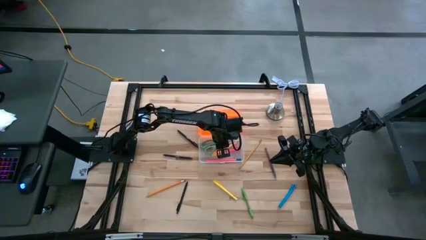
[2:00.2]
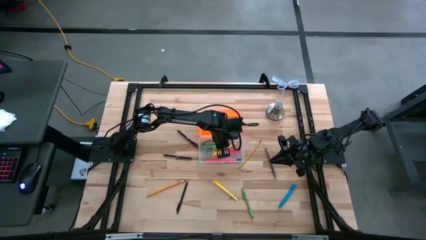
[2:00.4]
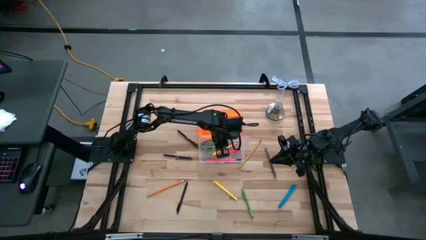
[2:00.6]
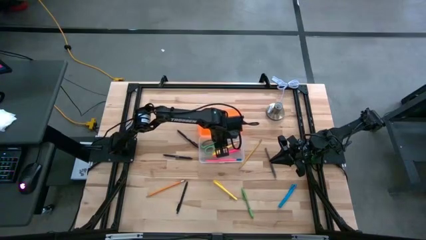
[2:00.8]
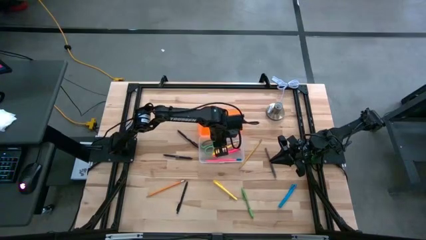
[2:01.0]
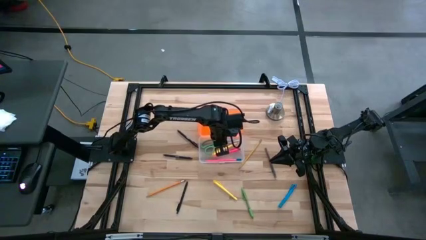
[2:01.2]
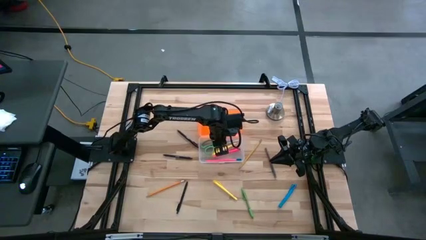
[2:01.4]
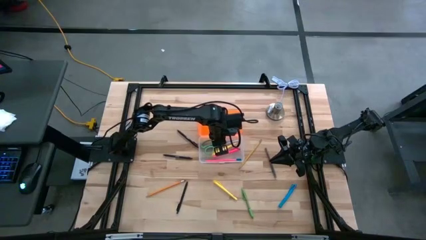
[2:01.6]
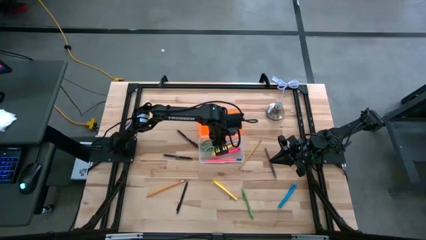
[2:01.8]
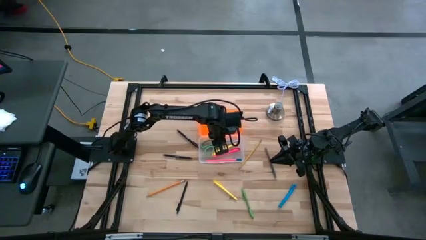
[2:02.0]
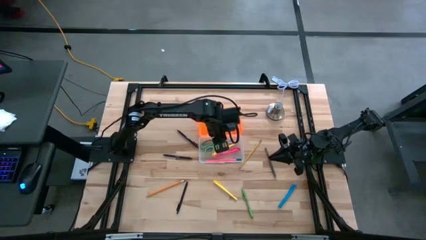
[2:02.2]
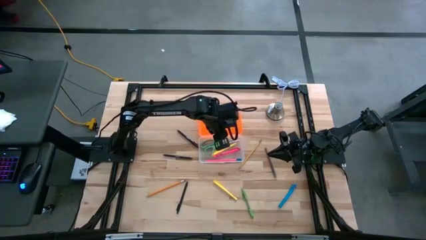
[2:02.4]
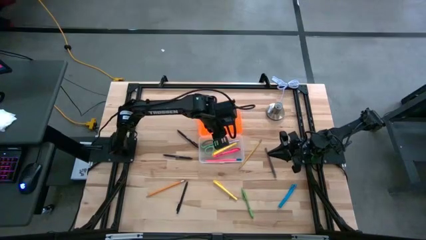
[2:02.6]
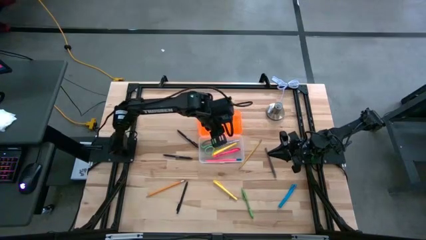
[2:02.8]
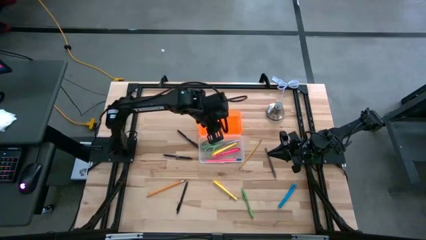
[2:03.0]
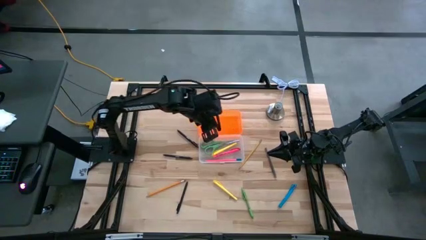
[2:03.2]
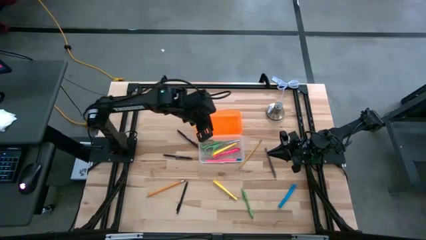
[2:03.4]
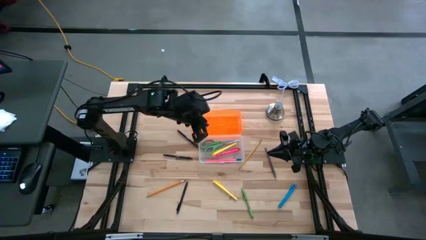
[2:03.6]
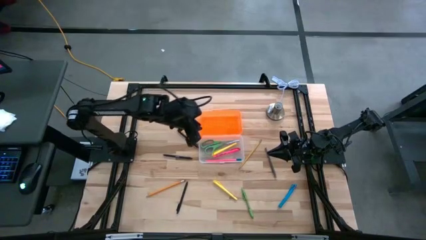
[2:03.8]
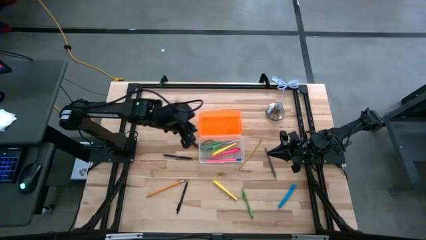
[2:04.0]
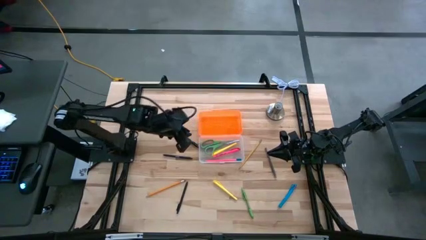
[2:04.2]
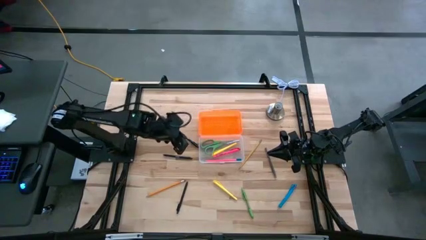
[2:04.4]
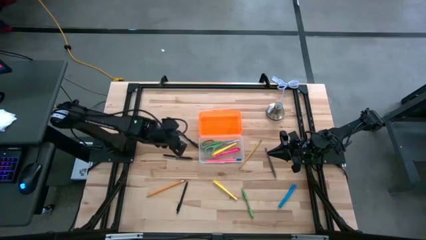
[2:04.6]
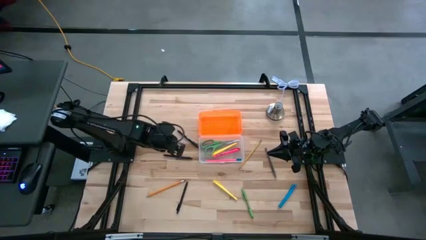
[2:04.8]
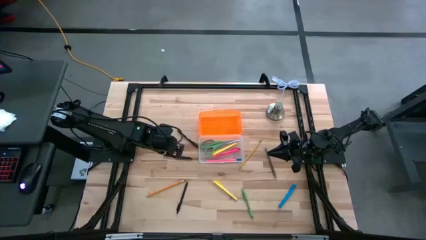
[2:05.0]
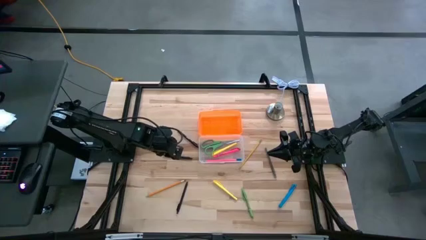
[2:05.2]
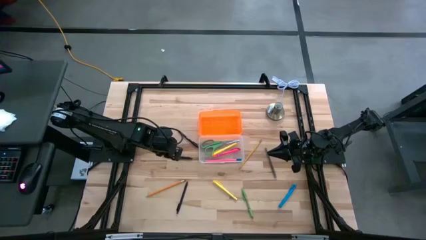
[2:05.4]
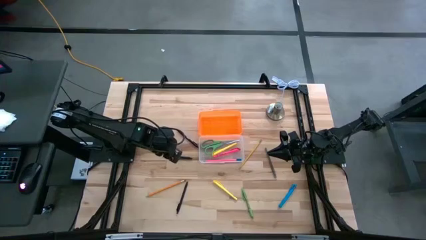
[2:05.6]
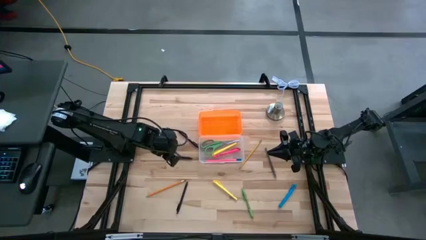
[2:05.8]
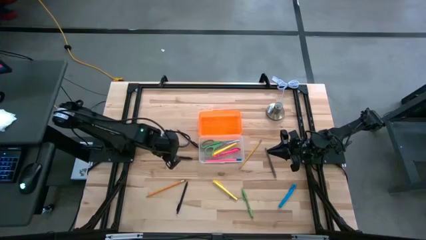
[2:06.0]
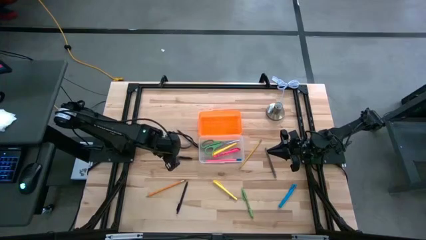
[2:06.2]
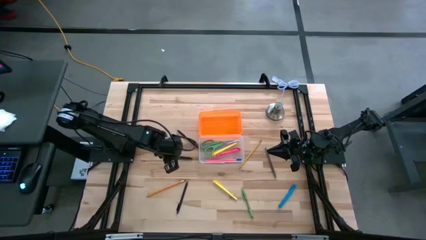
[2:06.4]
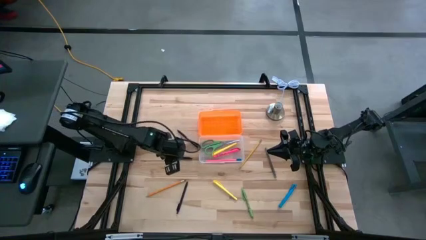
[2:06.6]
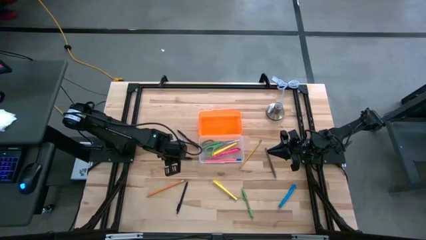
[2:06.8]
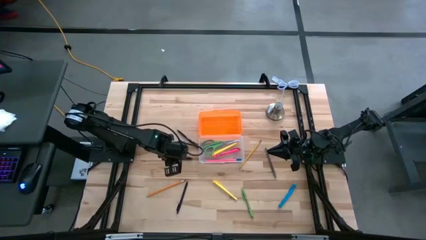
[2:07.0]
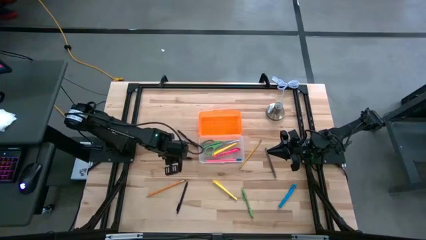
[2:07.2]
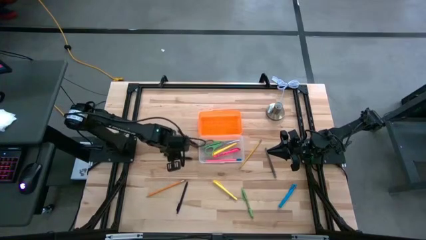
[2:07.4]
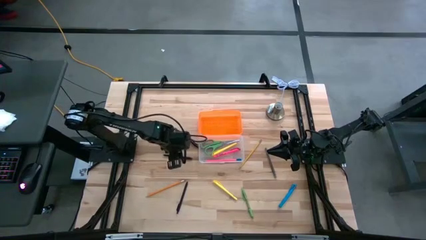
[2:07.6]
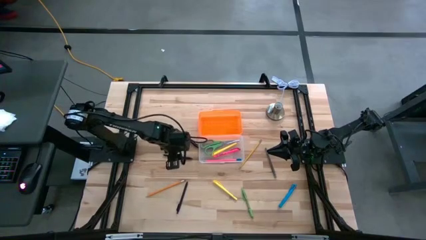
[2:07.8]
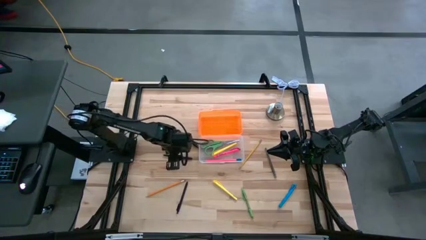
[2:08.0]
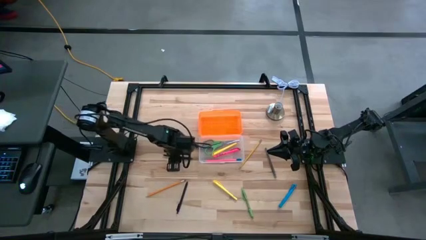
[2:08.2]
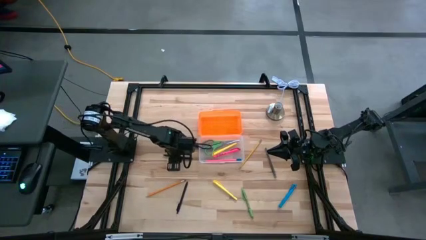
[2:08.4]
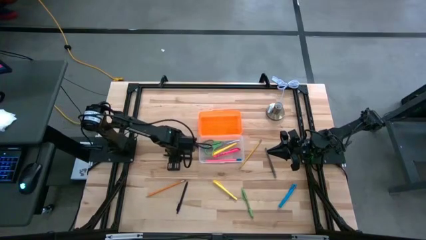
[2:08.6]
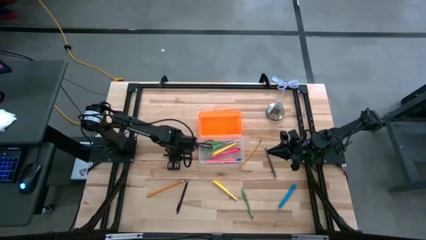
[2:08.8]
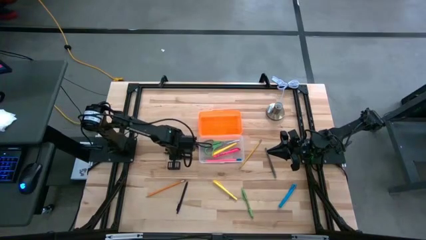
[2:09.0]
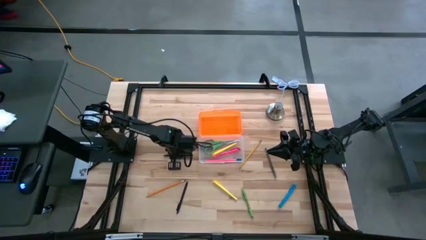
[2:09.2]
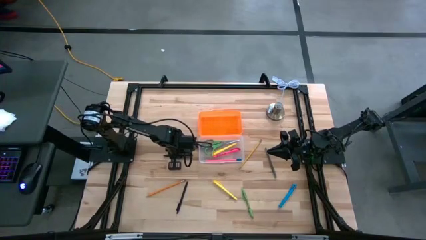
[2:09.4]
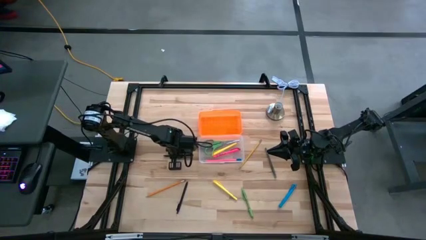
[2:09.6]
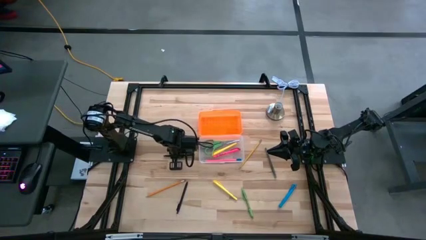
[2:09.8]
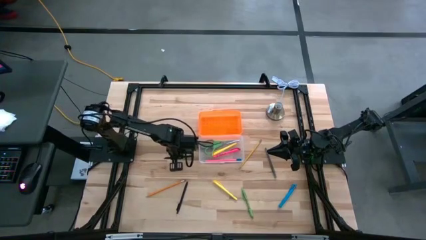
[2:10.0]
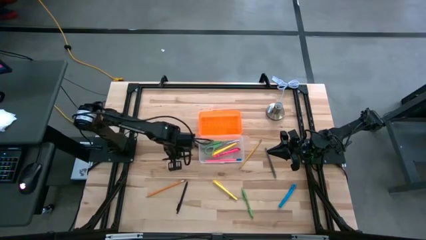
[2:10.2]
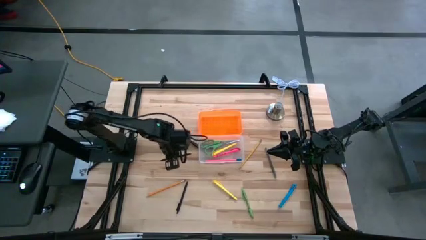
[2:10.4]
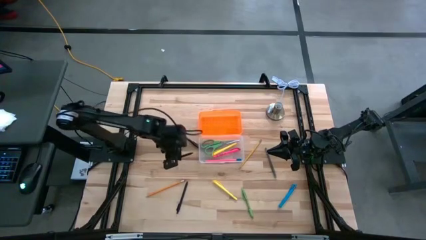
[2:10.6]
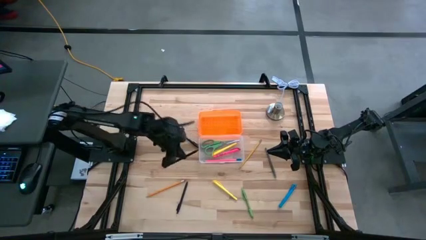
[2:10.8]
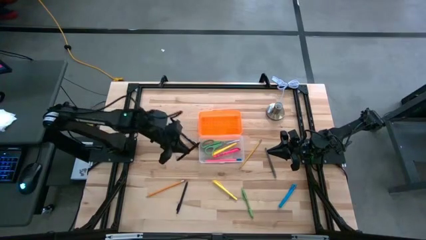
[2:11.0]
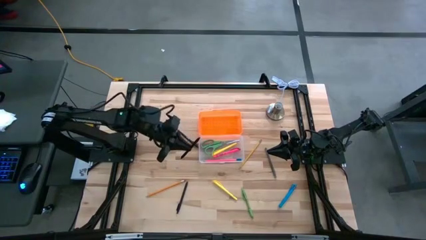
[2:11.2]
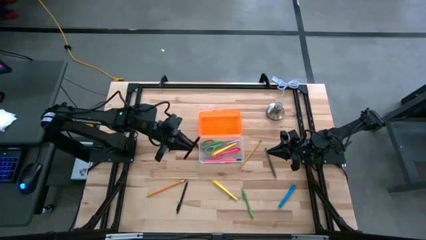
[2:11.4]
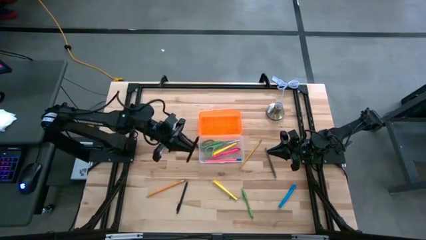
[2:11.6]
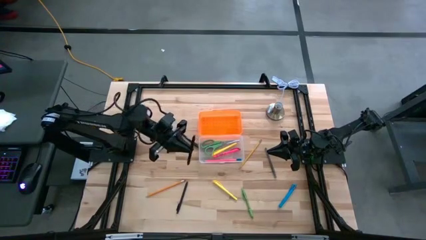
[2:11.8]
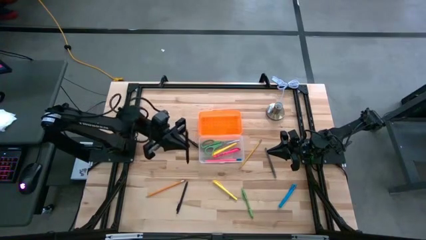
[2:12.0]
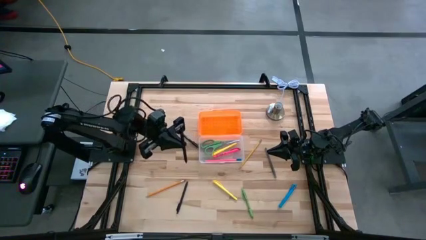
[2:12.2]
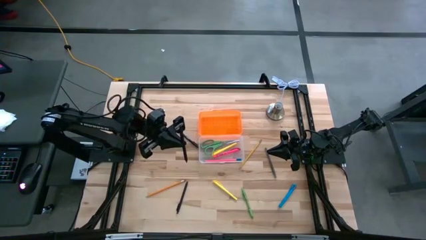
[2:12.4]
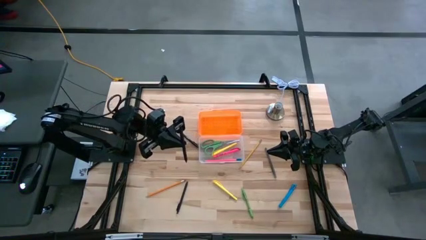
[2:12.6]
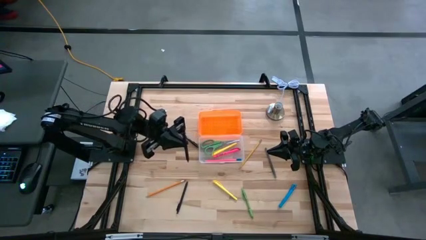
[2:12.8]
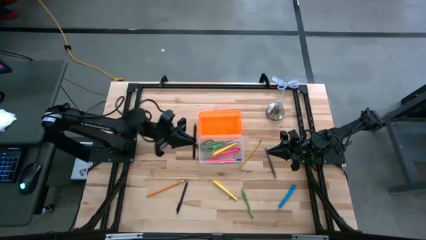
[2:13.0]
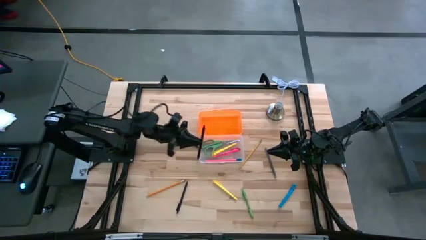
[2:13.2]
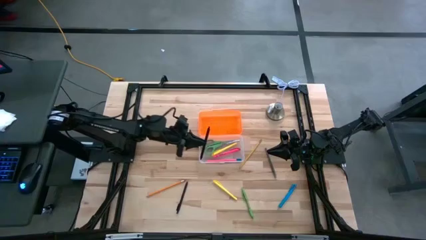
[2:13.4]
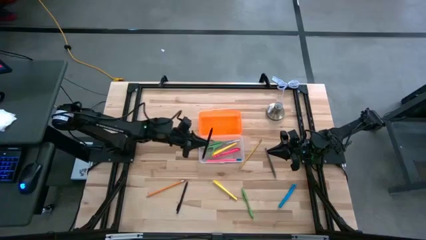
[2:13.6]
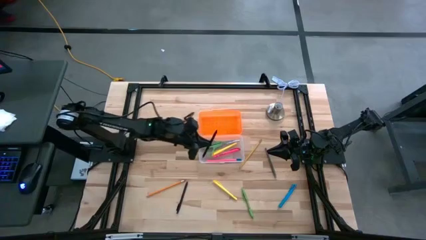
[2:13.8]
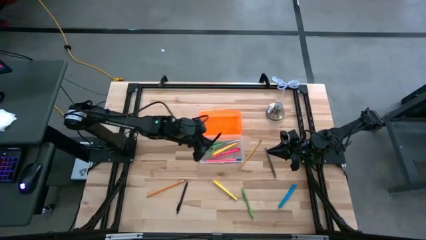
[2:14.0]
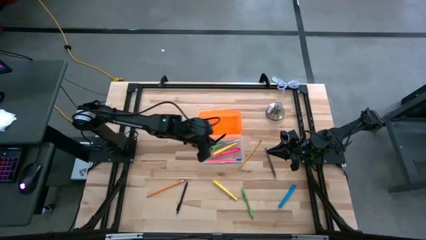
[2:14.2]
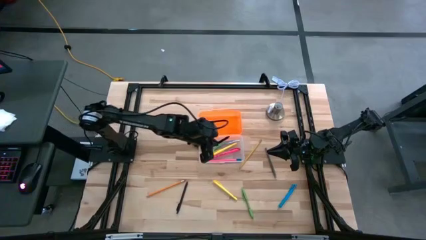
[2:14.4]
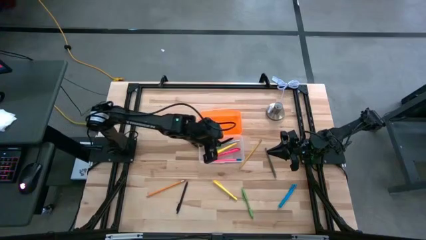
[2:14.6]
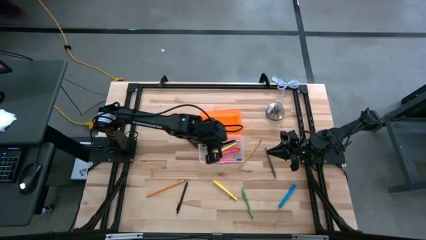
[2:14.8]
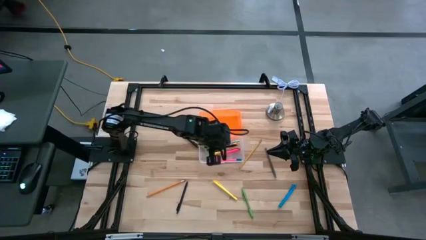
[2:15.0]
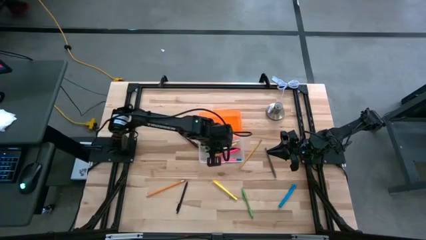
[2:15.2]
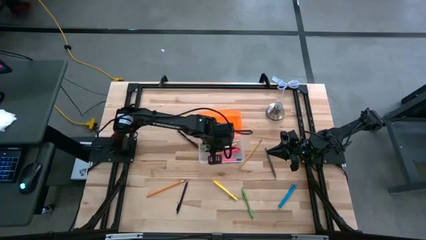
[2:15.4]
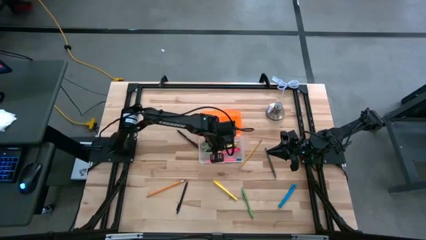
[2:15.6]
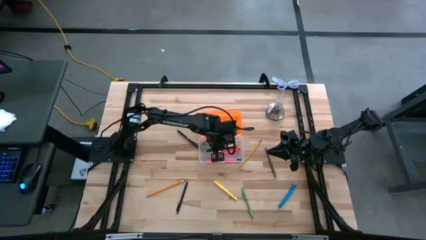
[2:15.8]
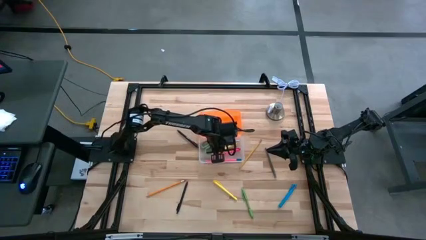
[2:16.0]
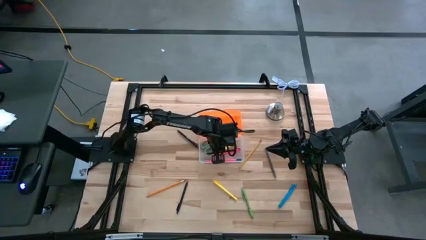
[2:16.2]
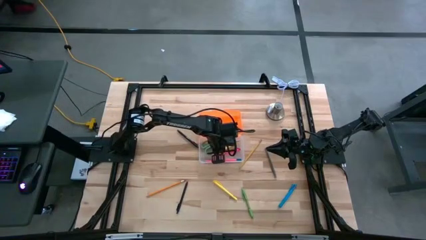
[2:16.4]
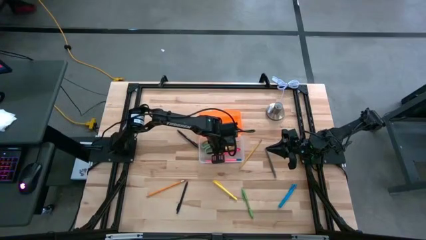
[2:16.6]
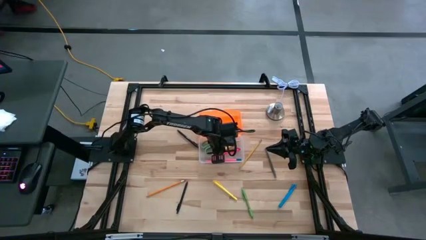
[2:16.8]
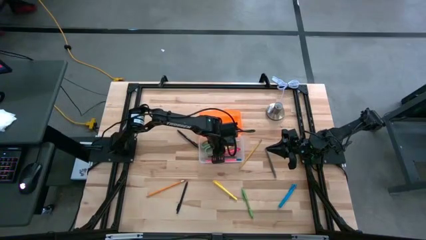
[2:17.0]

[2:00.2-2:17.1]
Task: Pick & place school supplies into a supply box
Put the black pen into the container
